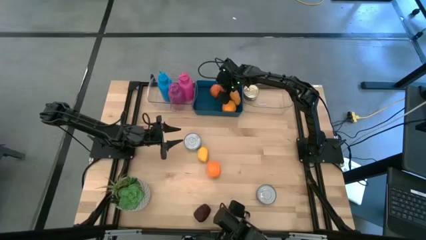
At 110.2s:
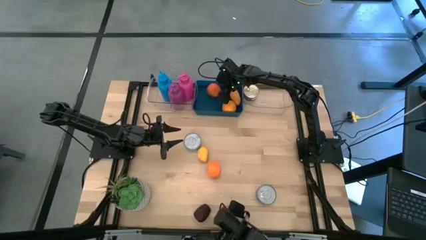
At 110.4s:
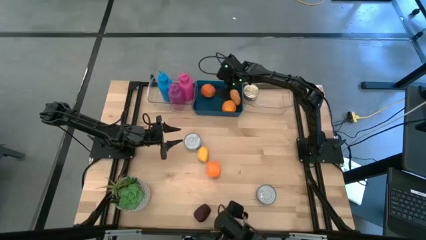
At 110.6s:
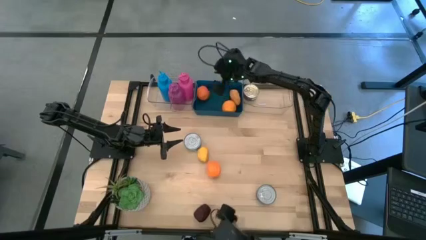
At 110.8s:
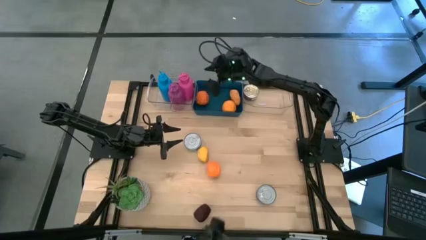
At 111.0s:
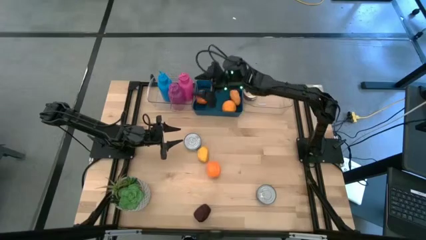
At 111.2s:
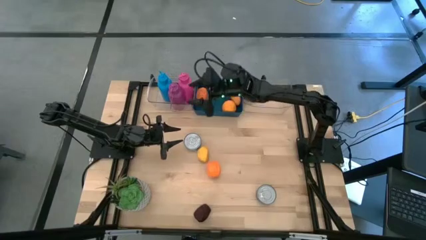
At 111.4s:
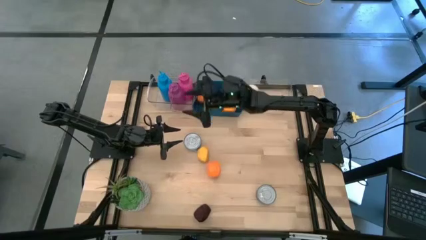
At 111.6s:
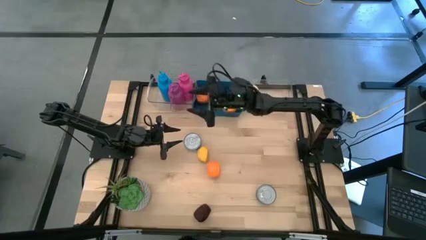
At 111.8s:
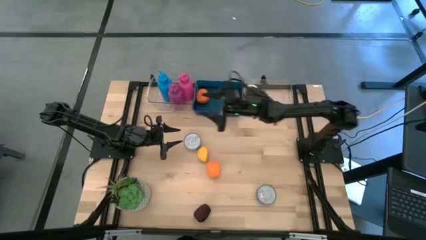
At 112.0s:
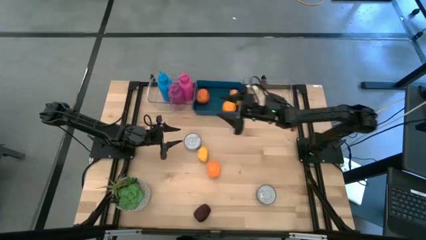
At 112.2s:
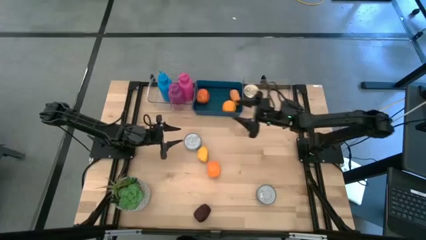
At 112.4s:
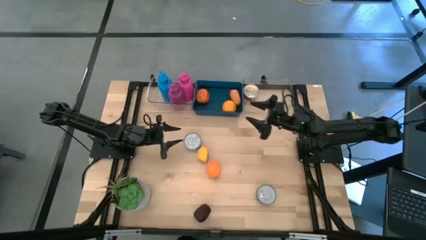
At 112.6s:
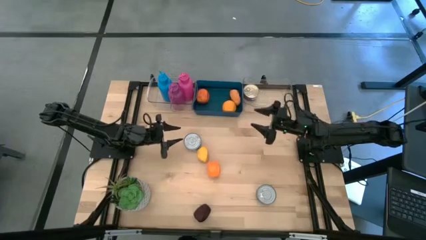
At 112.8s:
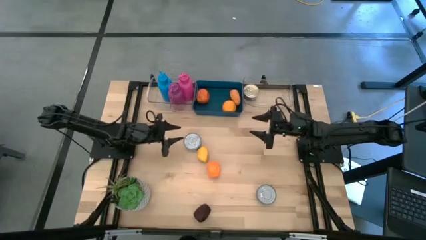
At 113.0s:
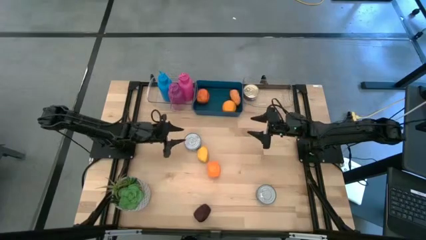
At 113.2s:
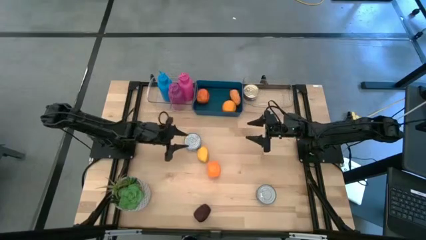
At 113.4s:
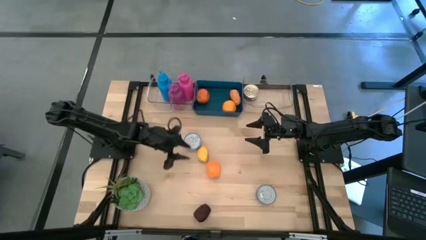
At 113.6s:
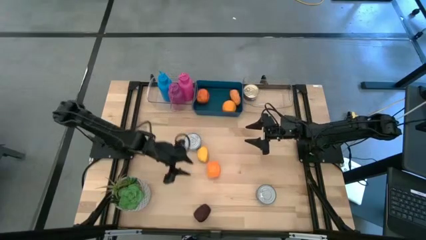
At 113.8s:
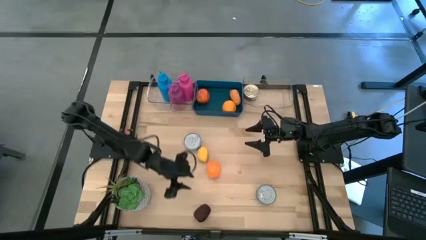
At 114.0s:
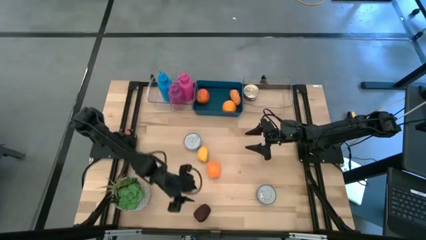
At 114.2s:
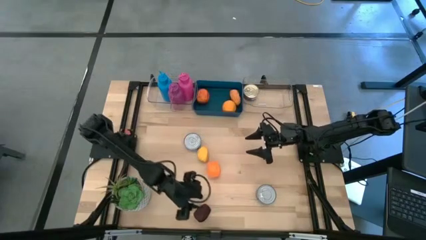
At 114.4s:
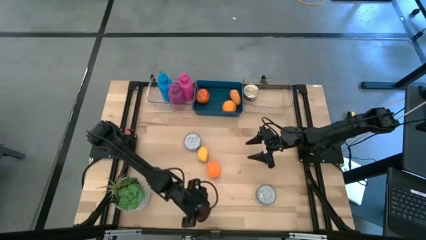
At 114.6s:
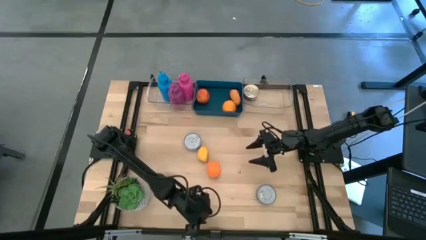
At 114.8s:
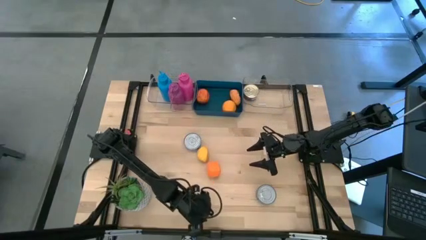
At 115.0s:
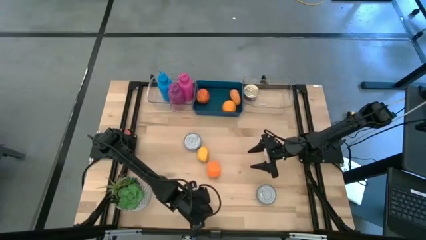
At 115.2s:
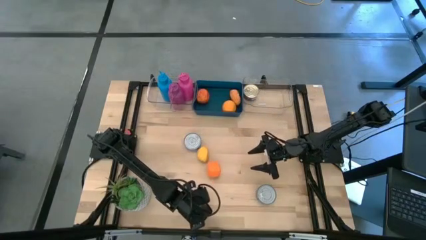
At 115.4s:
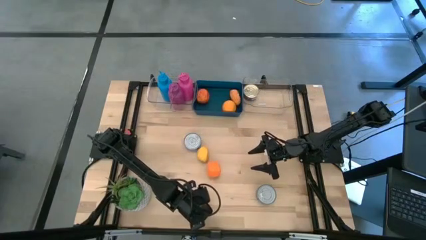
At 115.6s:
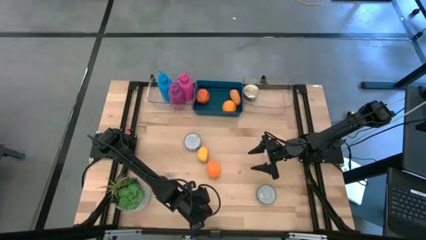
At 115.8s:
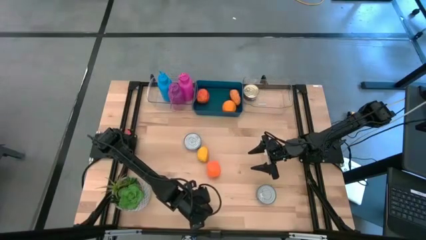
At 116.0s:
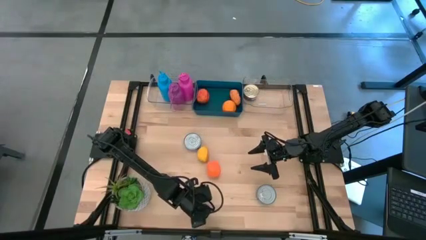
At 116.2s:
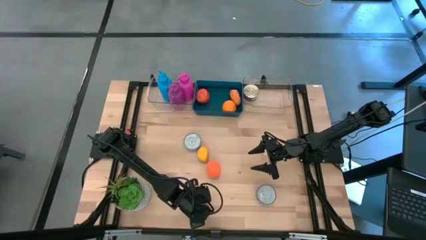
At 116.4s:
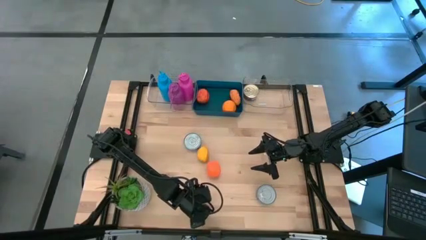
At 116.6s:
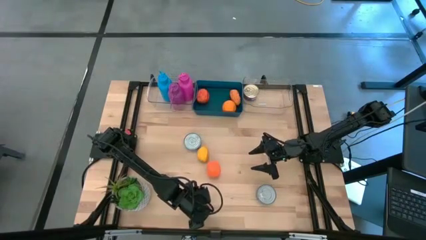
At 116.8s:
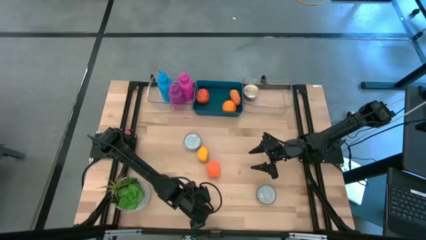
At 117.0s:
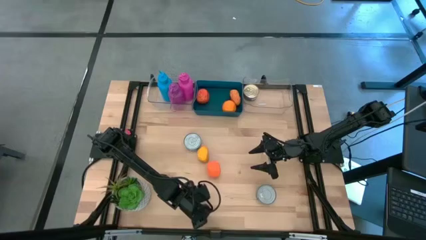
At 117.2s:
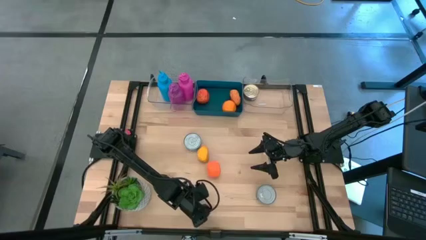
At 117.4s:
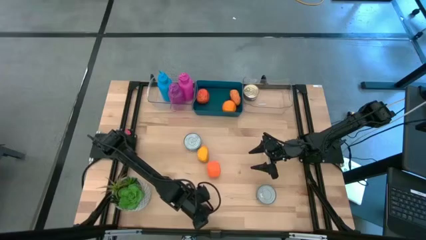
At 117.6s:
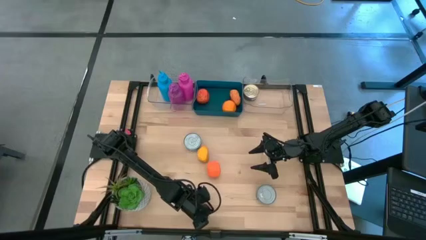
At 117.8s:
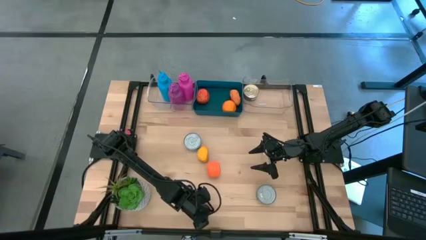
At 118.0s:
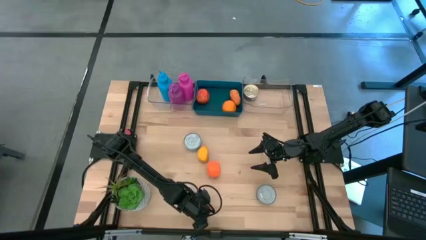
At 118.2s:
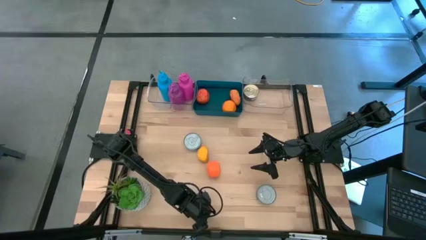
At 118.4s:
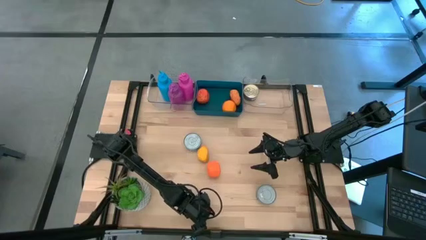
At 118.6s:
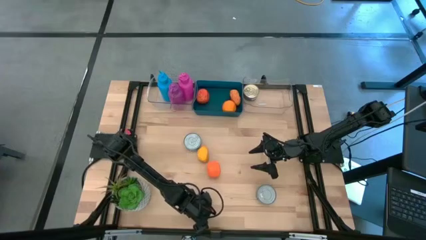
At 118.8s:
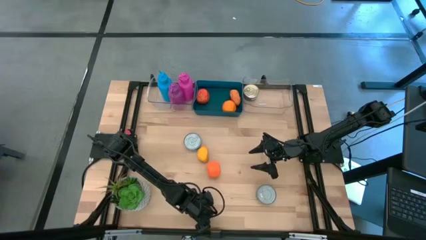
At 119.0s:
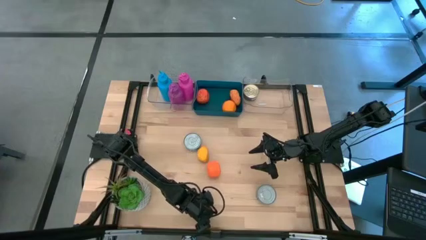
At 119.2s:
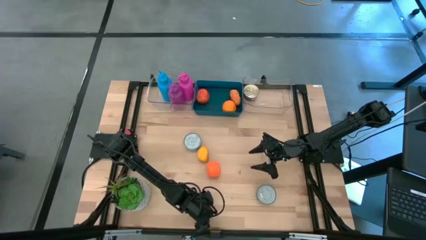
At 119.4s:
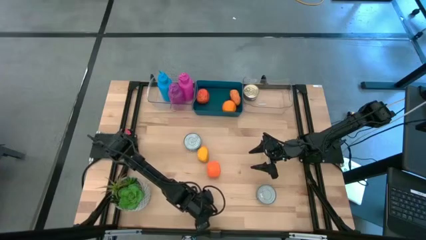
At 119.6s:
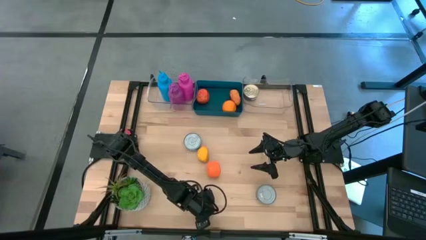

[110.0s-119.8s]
Task: Pick & Place Food Item
Put the pomegranate into the blue bin

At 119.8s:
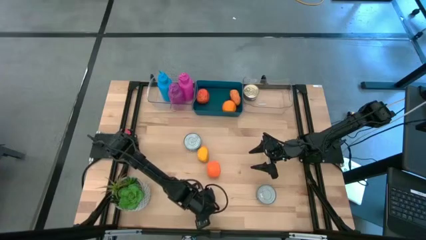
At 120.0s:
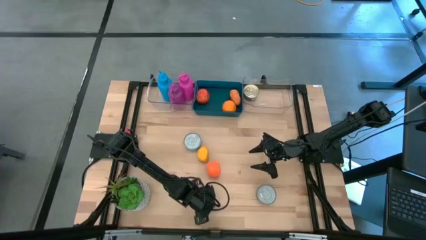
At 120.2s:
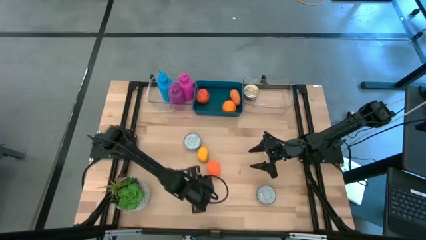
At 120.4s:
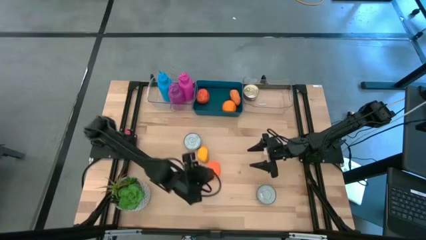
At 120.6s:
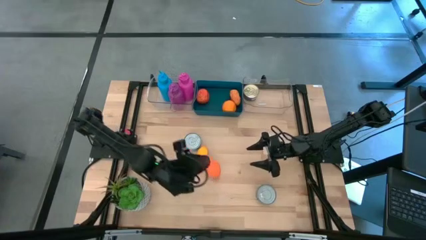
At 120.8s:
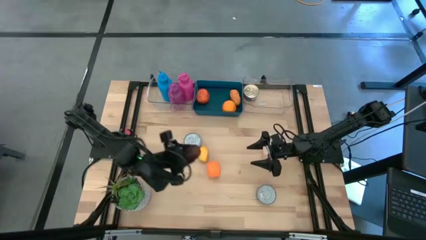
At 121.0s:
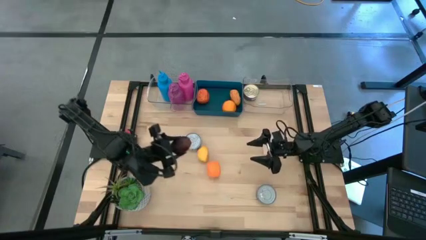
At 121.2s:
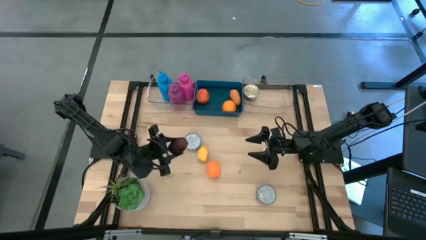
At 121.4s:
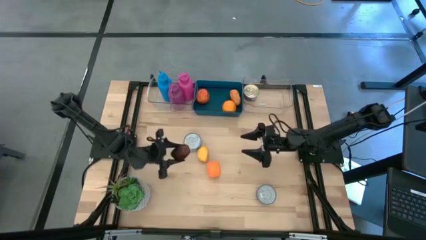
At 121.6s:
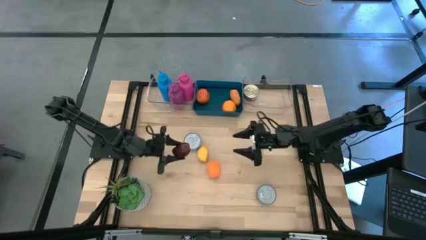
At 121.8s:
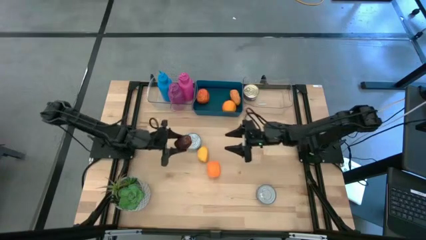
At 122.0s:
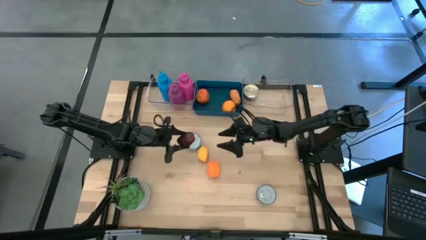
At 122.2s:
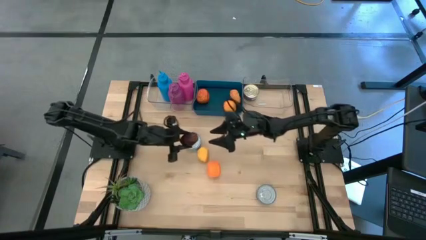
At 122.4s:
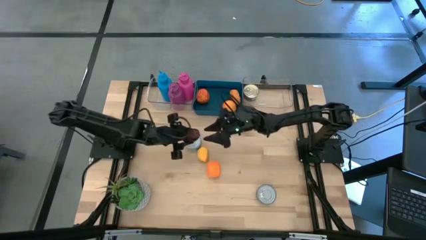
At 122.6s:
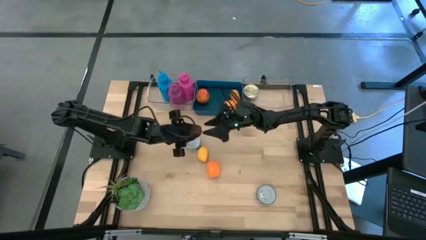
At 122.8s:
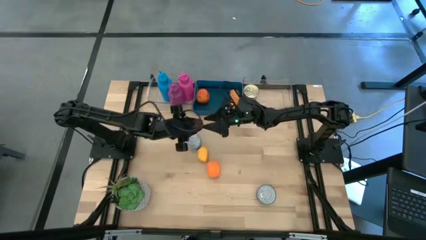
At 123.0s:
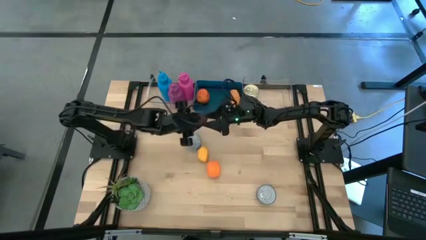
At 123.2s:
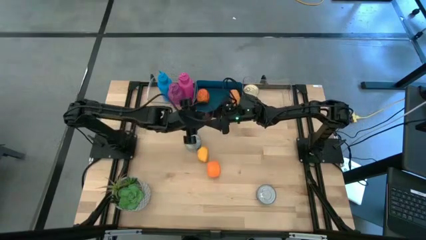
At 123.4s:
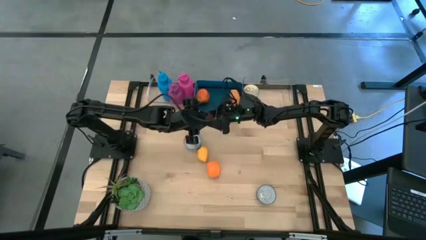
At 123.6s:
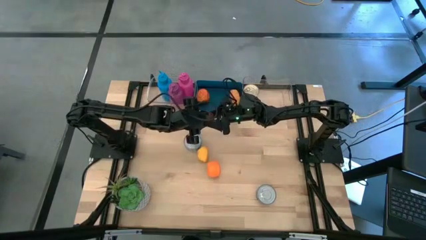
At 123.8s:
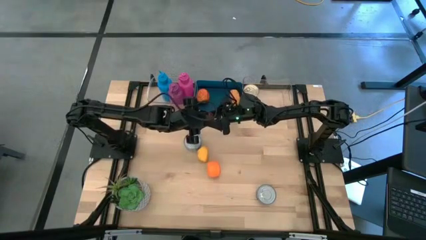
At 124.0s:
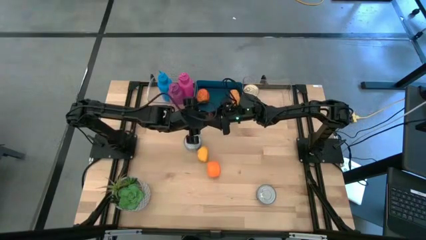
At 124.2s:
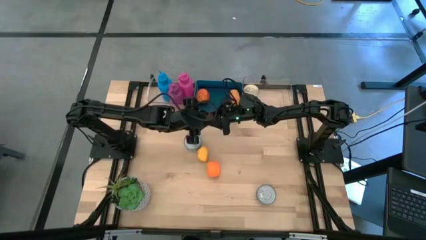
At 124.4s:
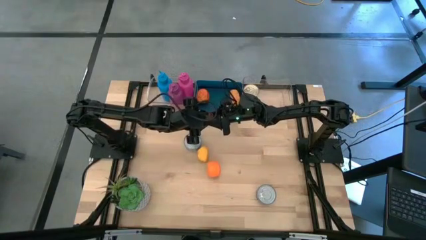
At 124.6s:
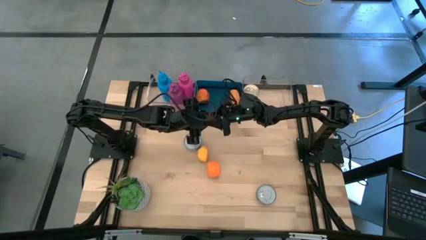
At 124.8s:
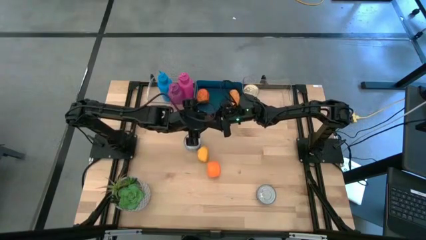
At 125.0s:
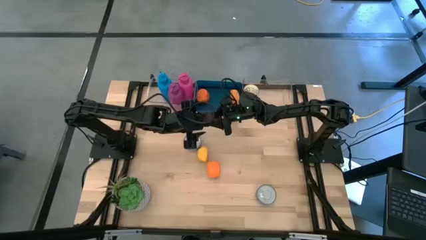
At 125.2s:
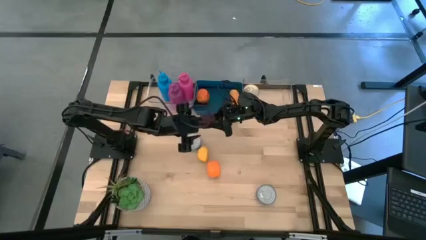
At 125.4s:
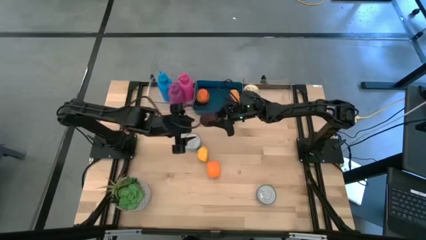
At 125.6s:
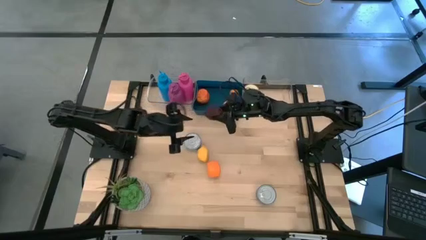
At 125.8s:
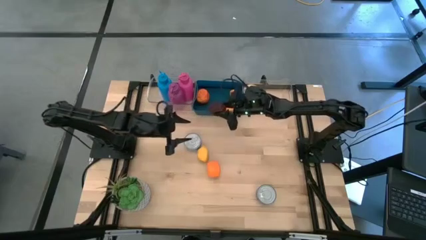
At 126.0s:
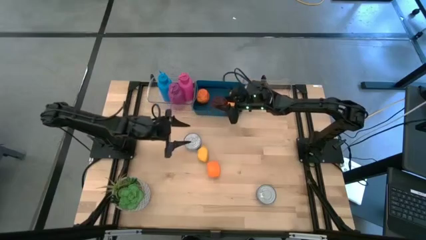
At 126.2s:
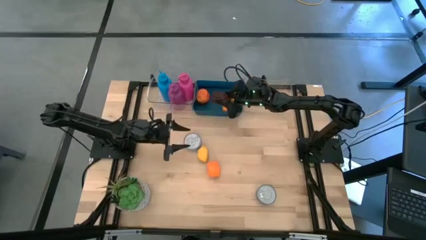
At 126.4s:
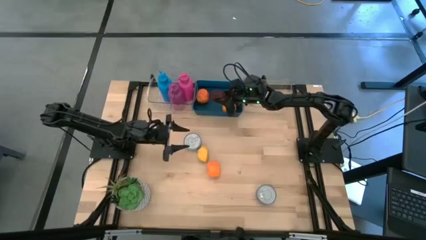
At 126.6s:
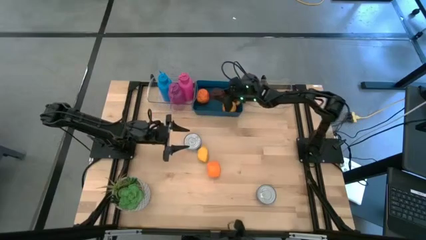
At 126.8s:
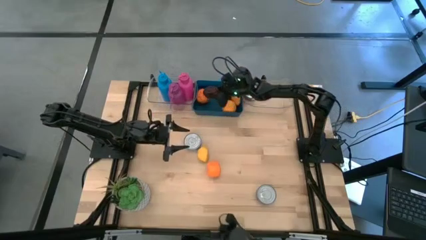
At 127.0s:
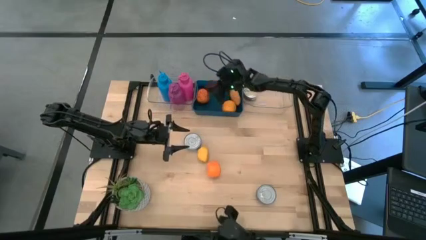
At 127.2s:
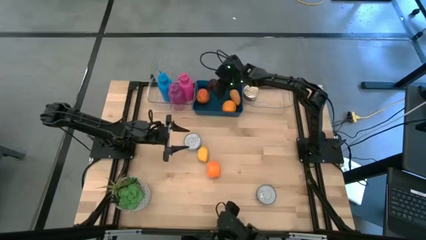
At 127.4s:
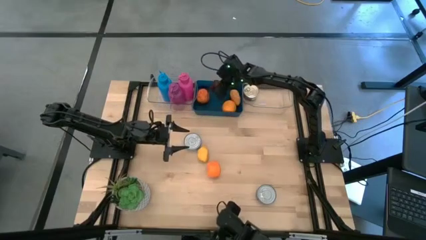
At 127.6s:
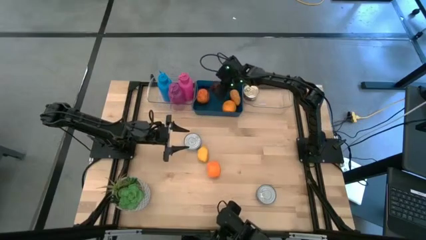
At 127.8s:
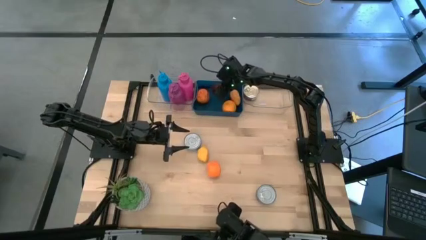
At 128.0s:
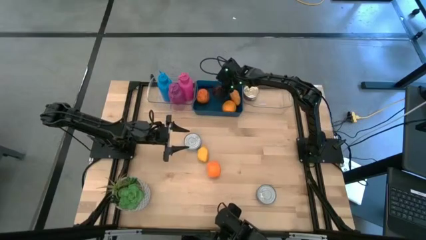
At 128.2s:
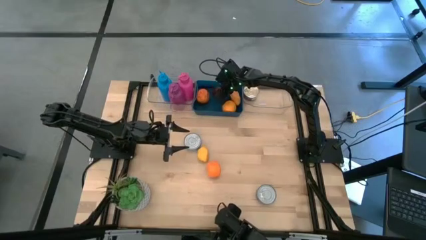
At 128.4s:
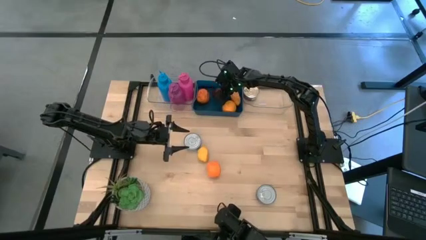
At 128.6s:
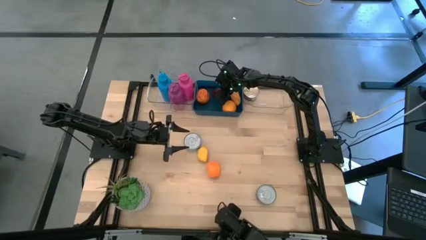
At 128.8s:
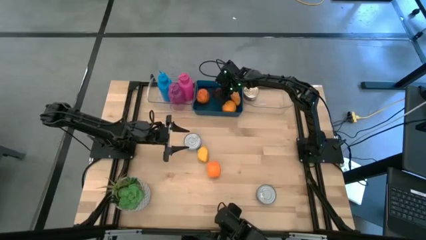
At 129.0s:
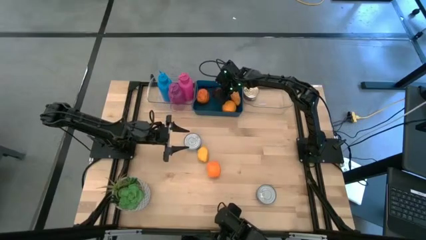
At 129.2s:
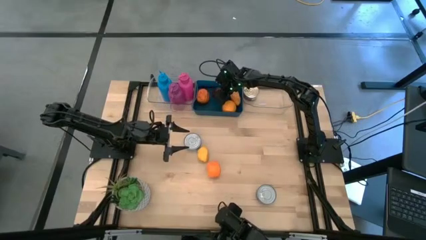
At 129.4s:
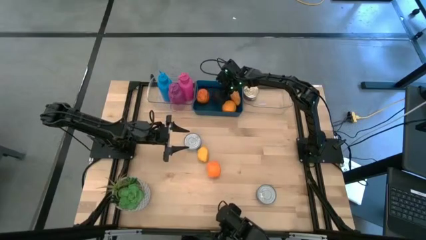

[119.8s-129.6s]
Put the pomegranate into the blue bin
